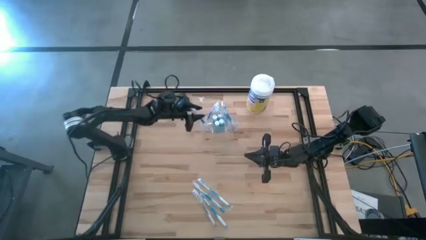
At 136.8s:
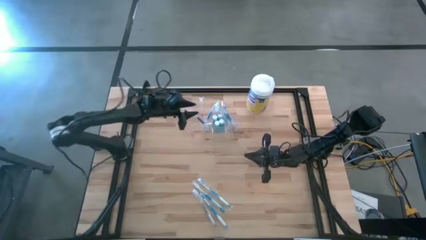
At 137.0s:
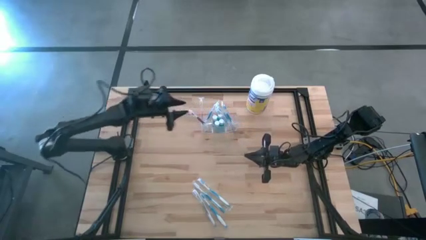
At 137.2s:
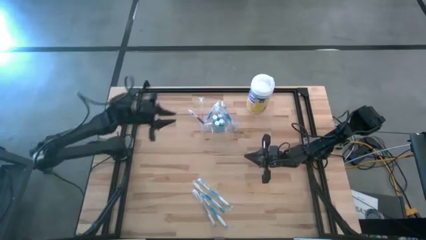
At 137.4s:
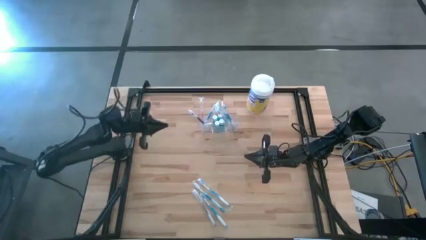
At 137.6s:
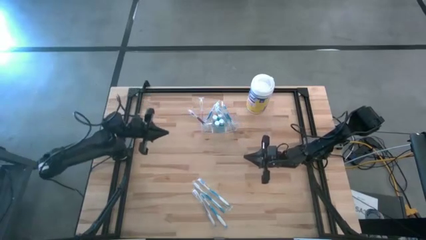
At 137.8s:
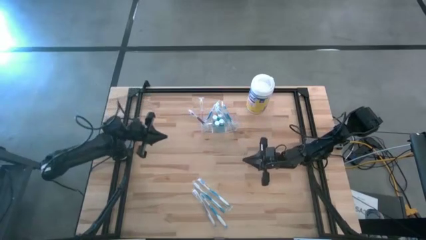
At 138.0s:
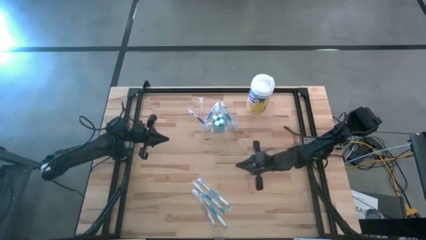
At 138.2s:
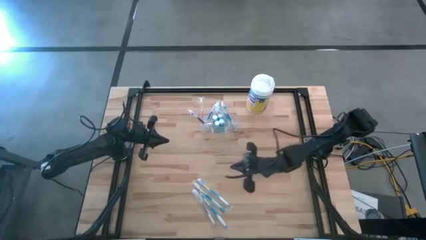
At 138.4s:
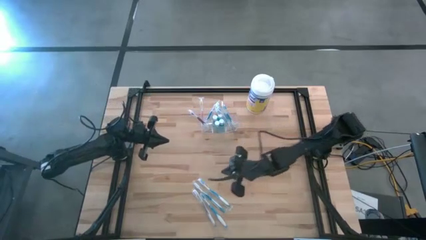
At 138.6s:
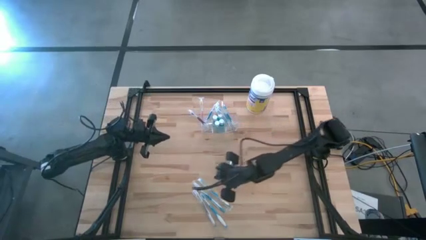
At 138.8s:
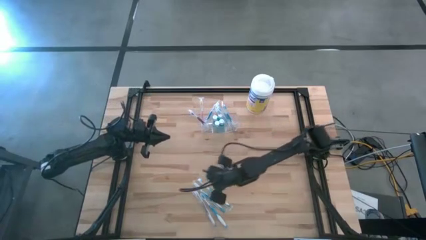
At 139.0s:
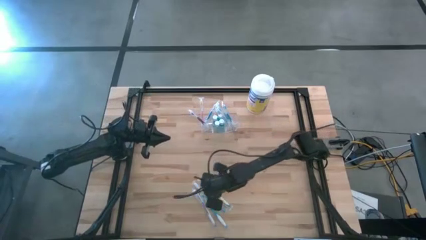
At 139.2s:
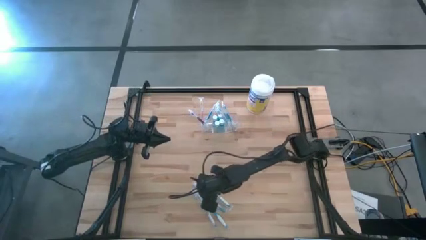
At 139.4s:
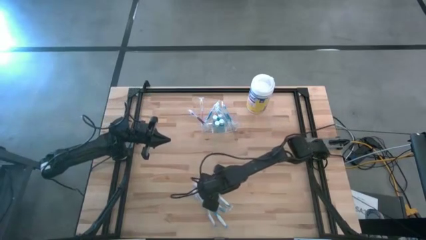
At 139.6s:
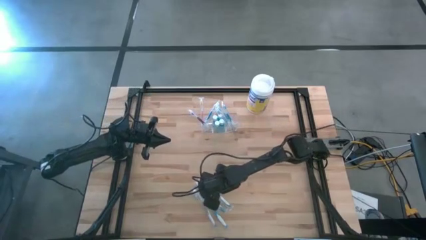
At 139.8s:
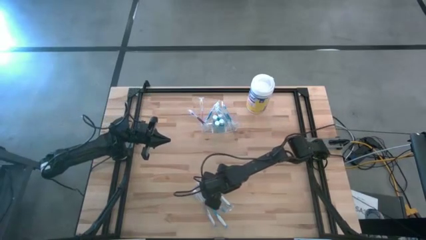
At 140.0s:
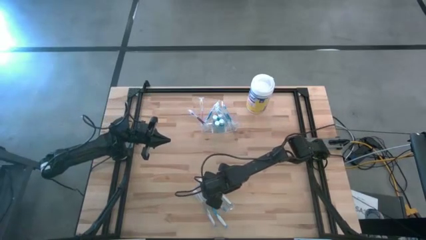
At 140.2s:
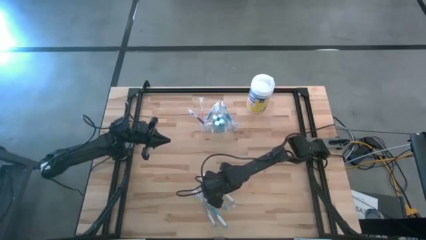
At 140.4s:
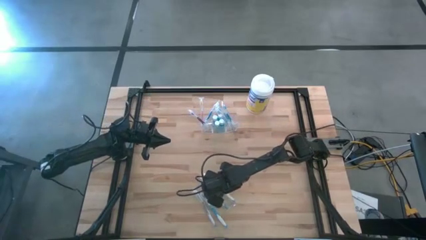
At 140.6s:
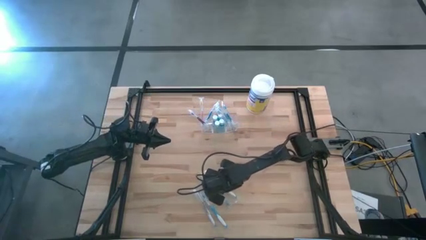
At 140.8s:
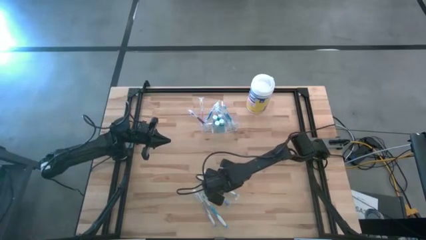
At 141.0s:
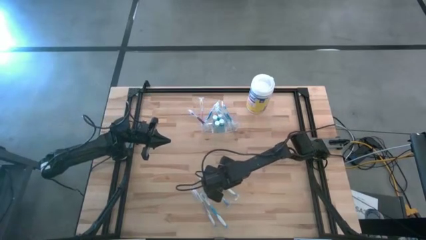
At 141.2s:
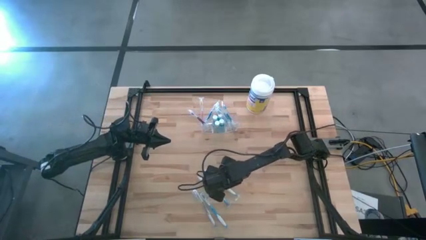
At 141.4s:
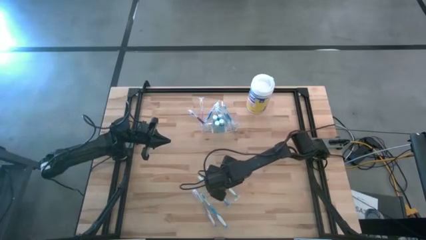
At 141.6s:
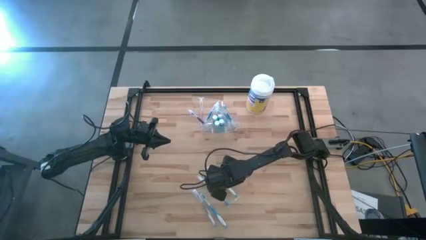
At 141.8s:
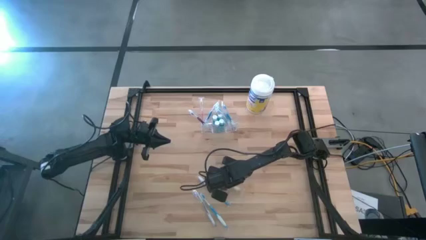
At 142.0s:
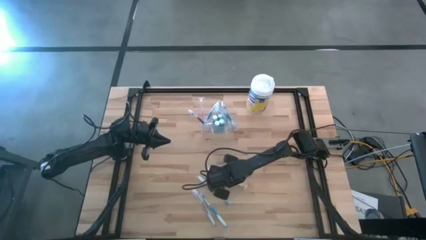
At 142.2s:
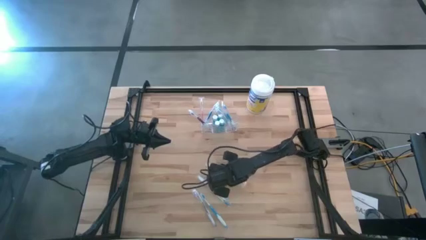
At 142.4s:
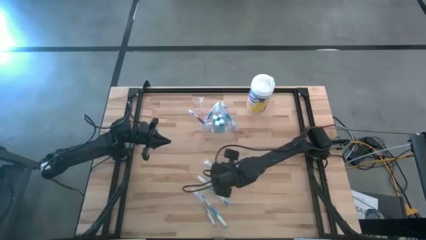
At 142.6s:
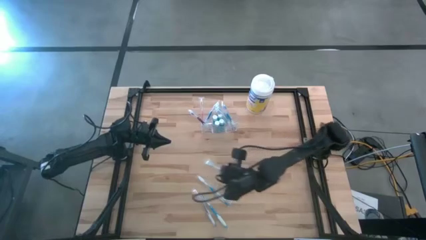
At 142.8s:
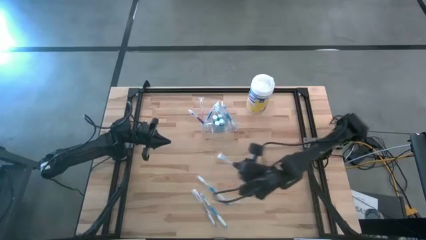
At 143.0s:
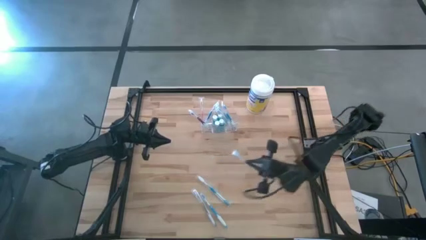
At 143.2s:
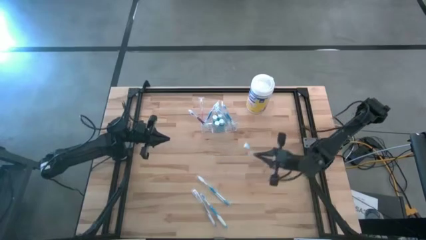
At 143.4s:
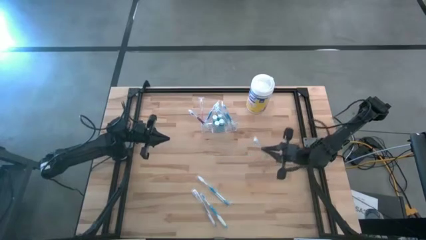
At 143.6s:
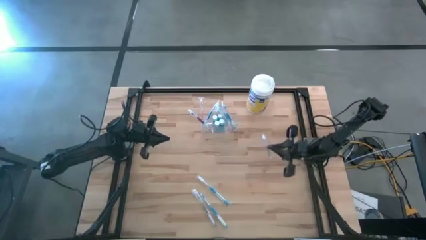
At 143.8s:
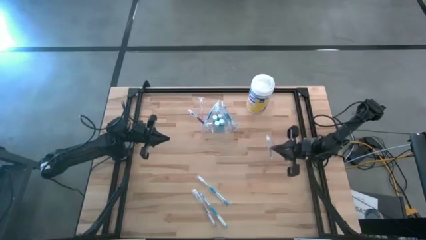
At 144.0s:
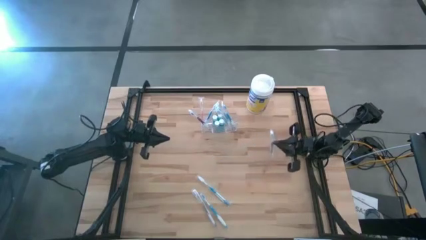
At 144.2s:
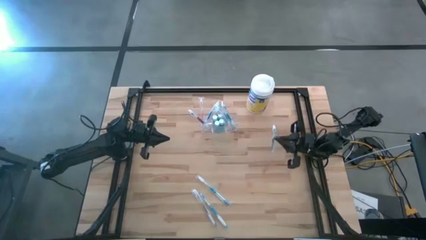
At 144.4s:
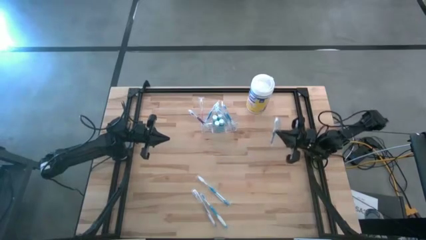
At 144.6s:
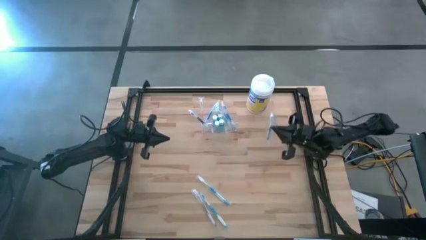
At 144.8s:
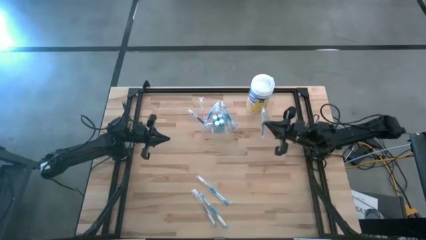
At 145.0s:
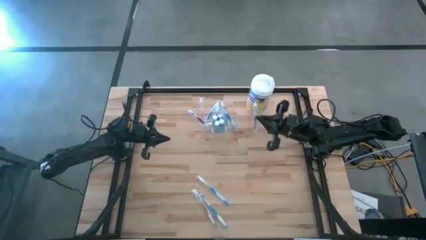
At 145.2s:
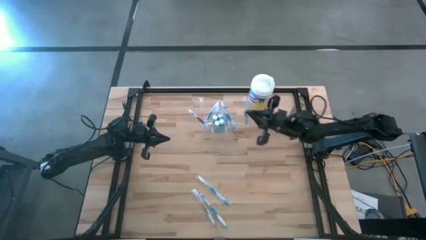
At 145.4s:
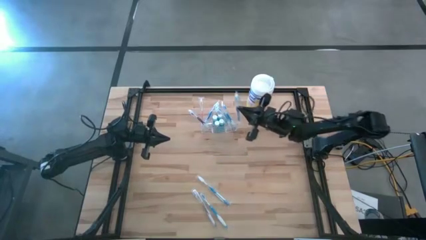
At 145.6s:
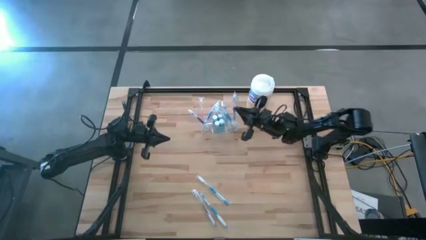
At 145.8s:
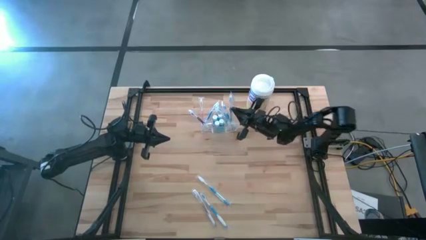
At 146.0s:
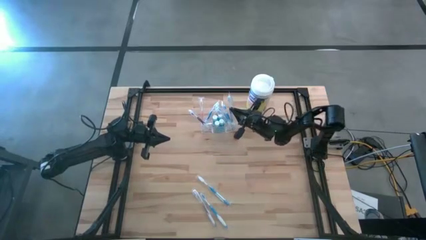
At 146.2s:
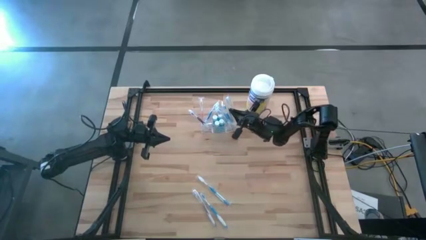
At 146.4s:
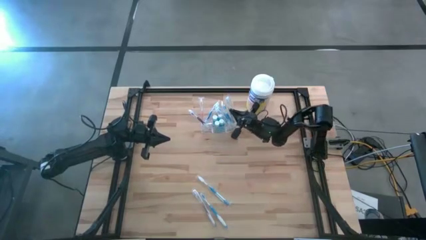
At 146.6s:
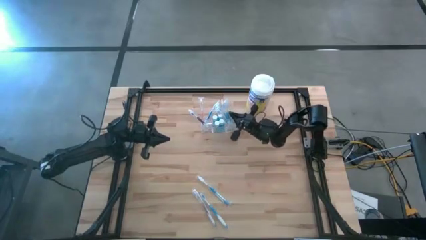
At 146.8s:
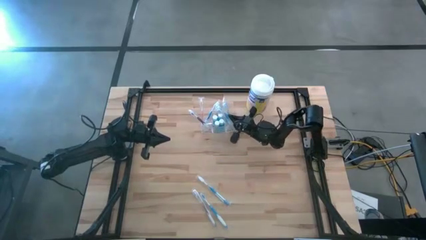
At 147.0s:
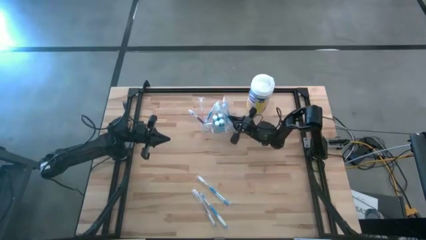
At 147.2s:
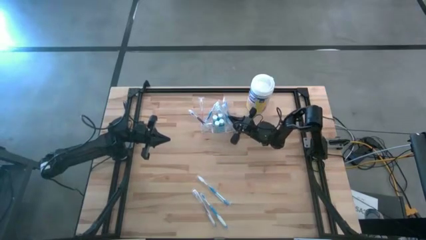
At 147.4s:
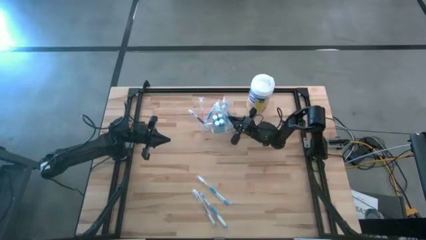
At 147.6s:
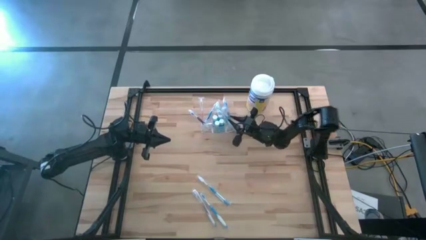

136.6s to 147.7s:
Task: Pick & Place toothbrushing station
Put the middle blue toothbrush into the transparent organizer

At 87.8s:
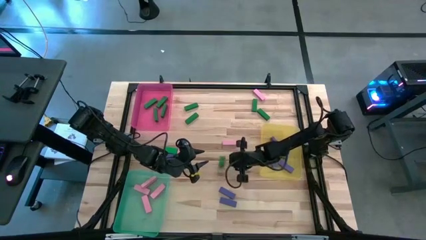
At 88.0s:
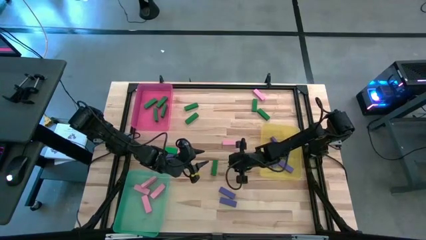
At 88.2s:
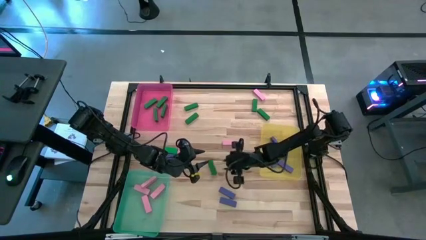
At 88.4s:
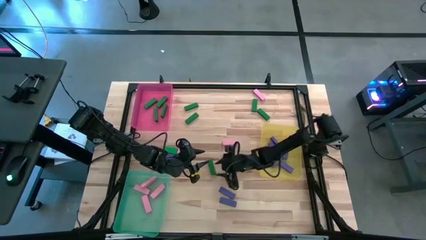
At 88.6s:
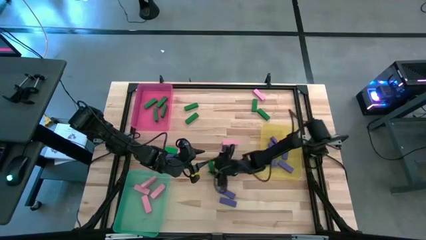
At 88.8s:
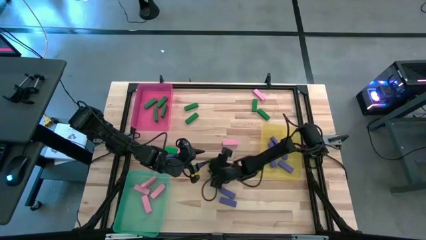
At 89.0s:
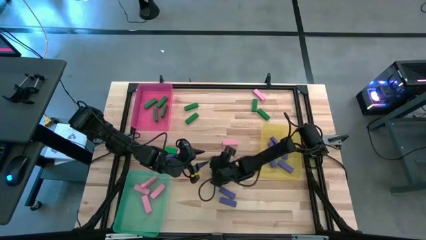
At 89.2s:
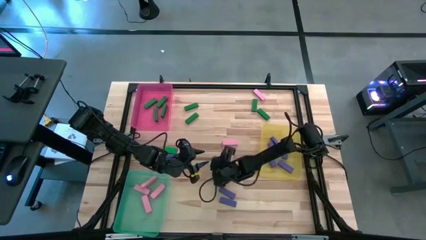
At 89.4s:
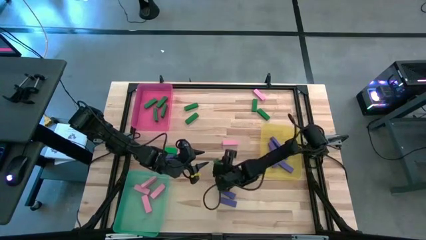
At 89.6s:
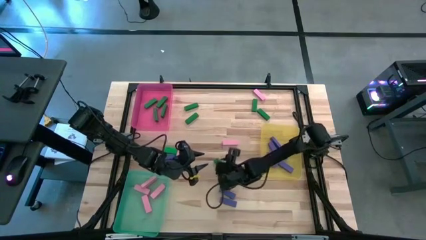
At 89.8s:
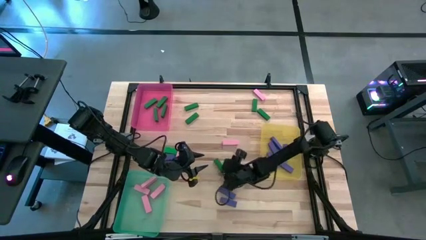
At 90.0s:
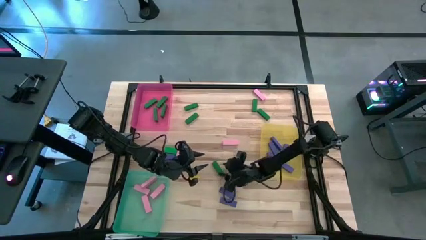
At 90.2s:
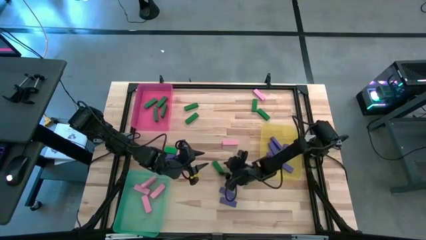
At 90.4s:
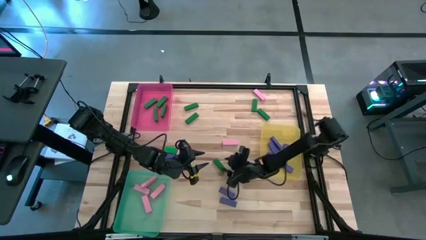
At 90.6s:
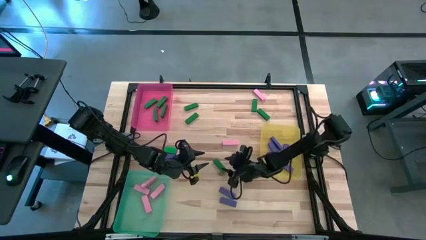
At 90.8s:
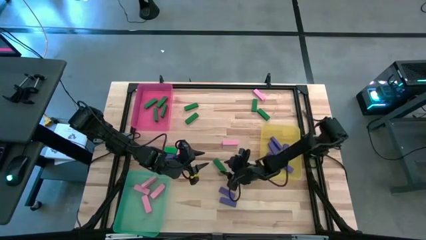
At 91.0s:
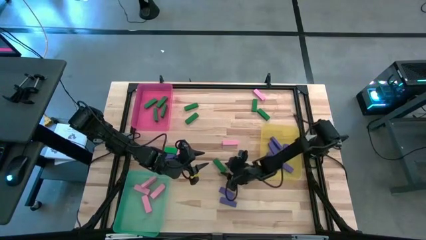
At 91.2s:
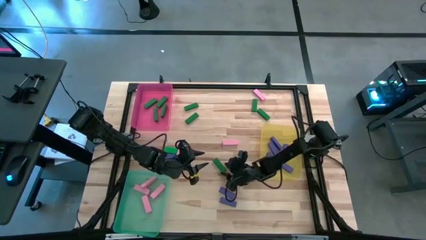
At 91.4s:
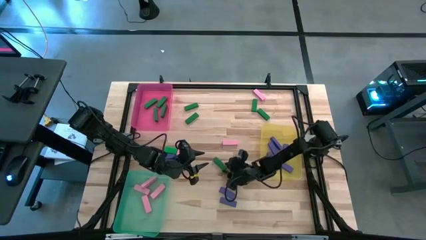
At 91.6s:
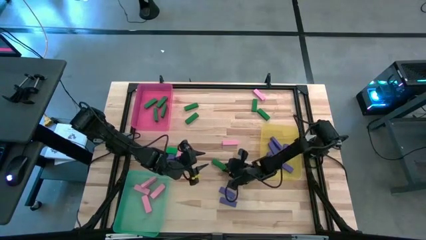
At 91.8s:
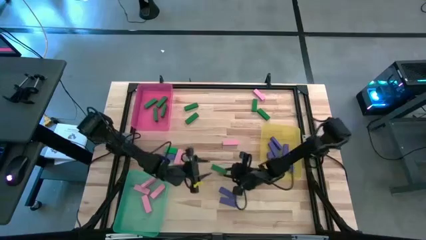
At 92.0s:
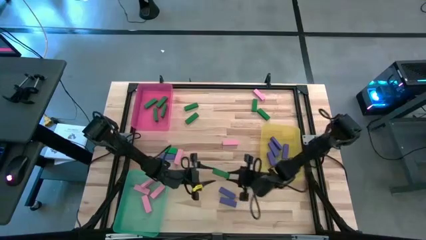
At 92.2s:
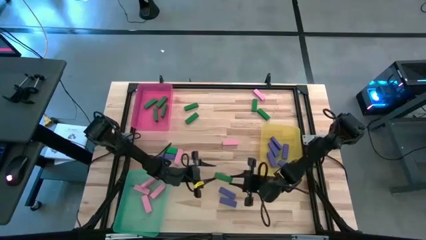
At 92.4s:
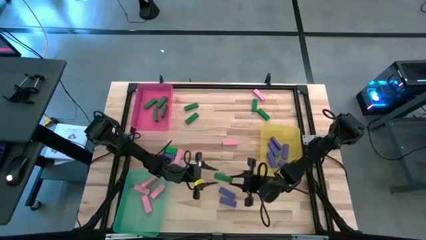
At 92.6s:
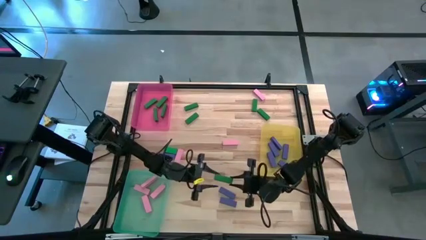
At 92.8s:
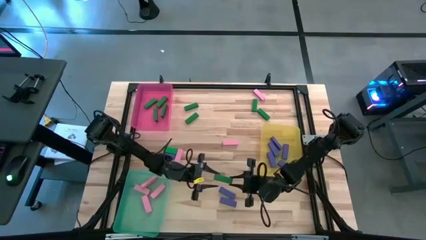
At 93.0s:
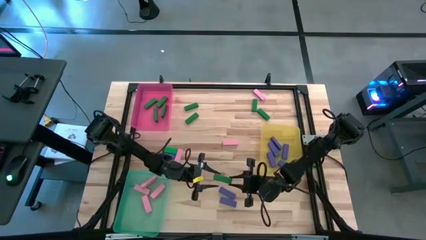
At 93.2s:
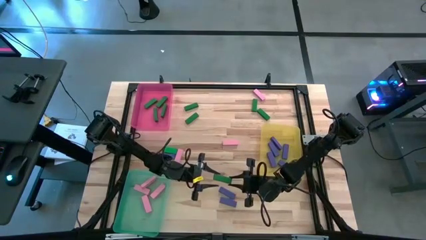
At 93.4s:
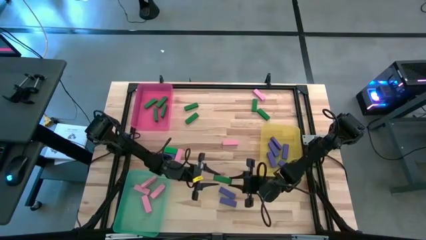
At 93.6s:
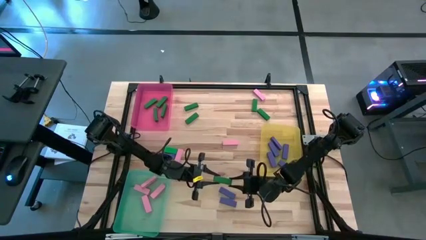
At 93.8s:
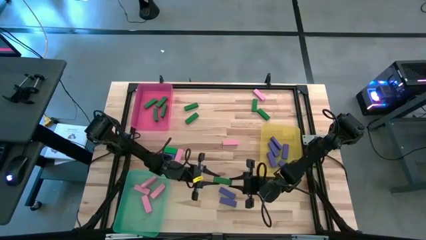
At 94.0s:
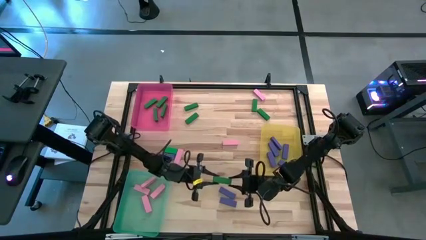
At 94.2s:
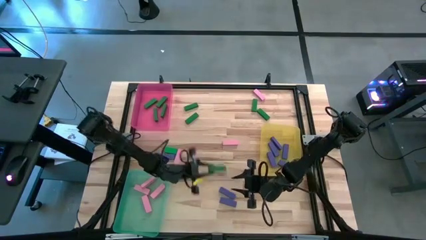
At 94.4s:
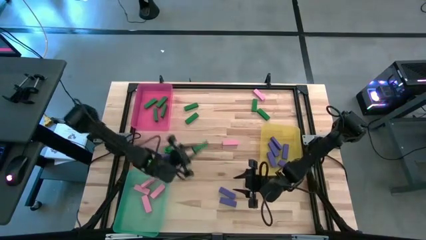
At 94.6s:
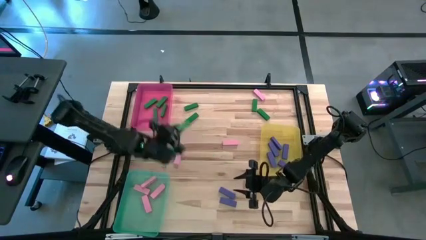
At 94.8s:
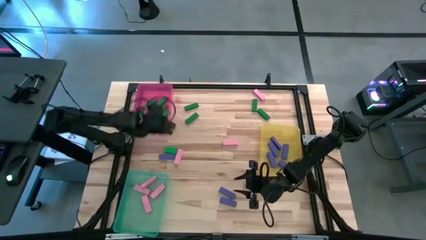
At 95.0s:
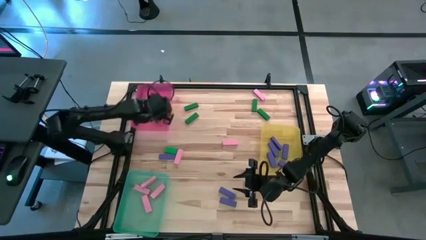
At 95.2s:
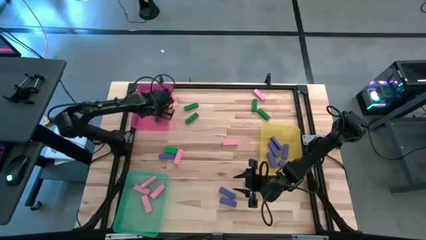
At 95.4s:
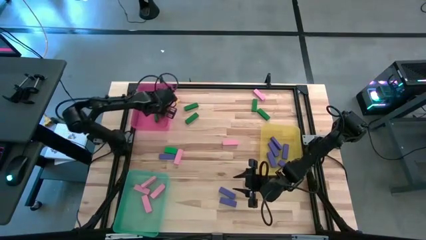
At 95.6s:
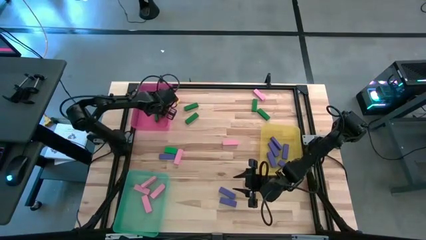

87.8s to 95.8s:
Task: Sort blocks
Put the green block into the pink bin
